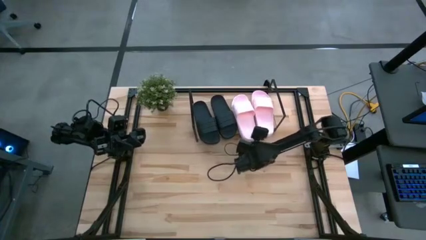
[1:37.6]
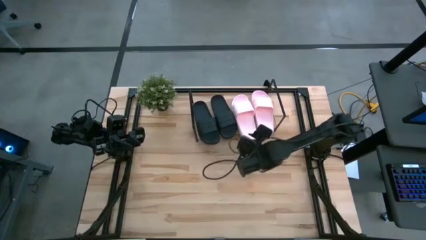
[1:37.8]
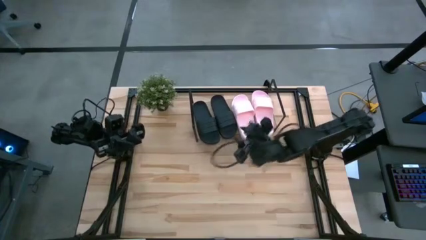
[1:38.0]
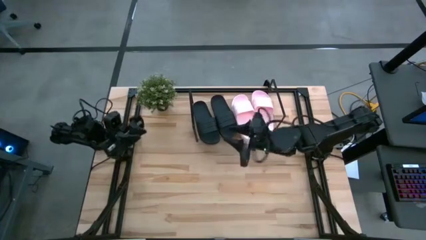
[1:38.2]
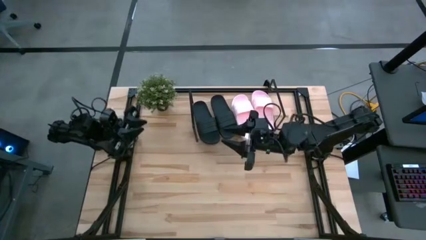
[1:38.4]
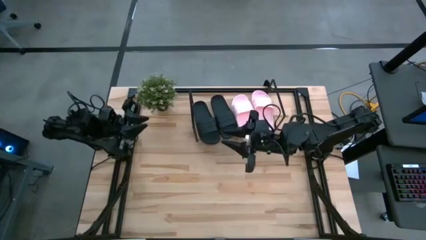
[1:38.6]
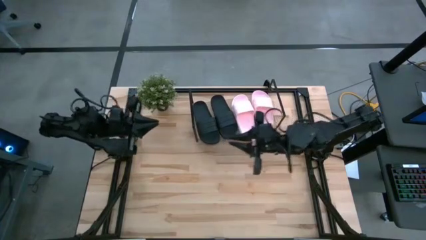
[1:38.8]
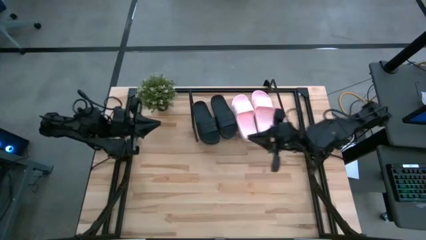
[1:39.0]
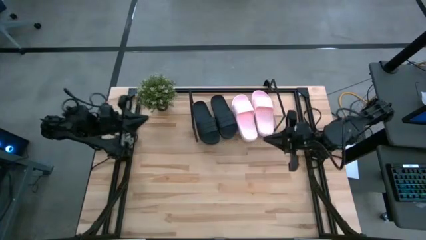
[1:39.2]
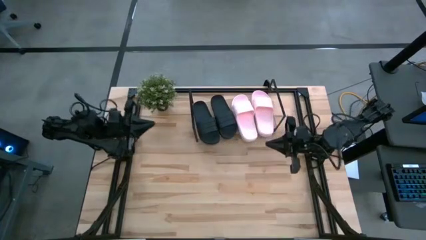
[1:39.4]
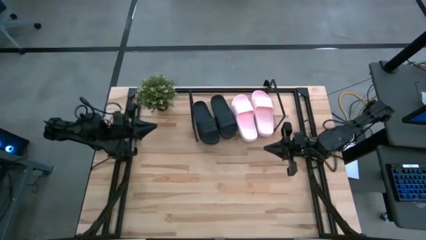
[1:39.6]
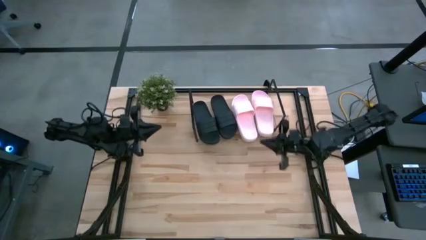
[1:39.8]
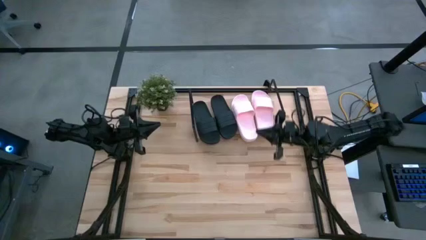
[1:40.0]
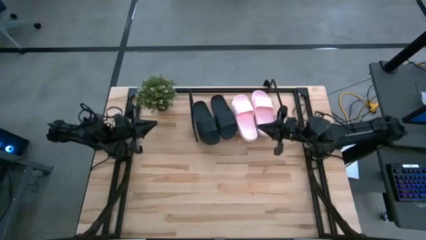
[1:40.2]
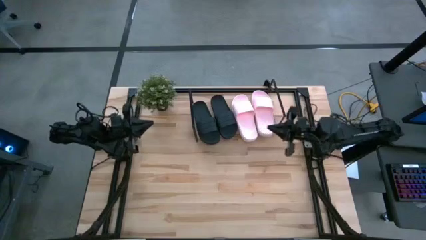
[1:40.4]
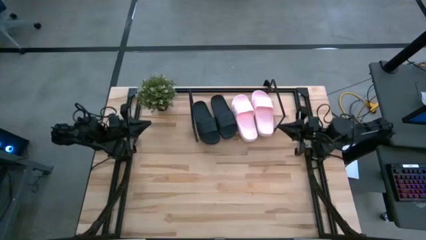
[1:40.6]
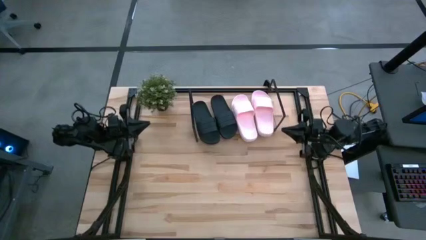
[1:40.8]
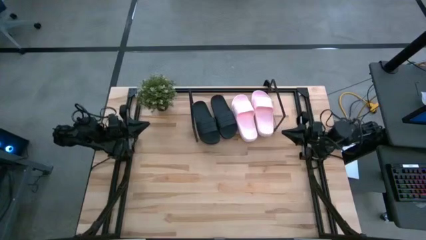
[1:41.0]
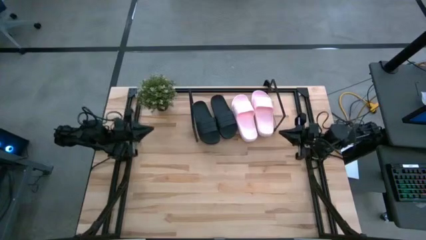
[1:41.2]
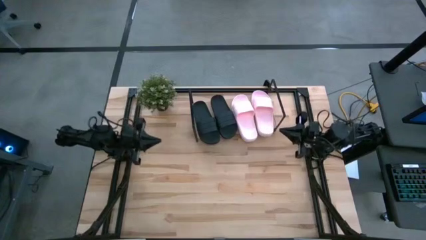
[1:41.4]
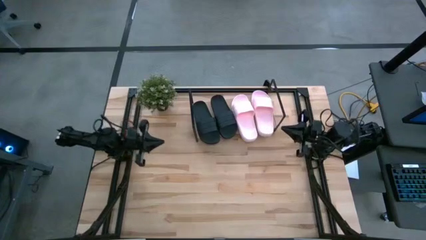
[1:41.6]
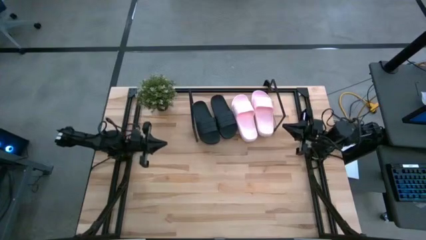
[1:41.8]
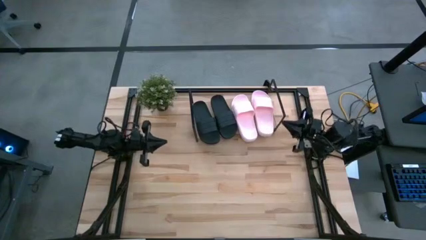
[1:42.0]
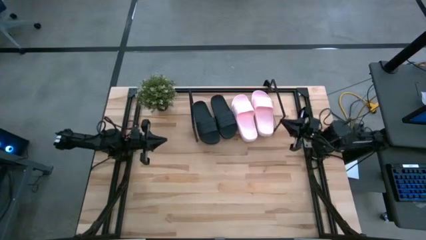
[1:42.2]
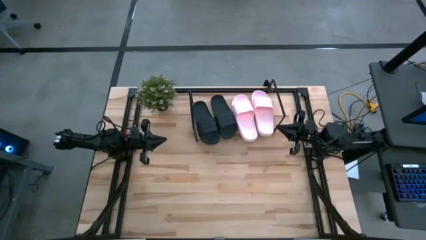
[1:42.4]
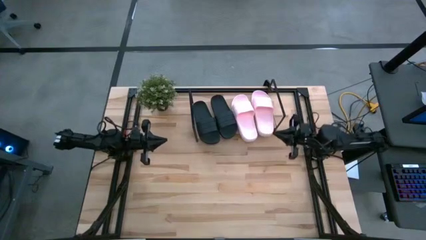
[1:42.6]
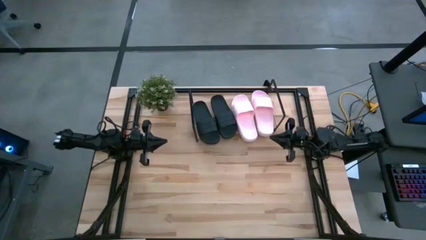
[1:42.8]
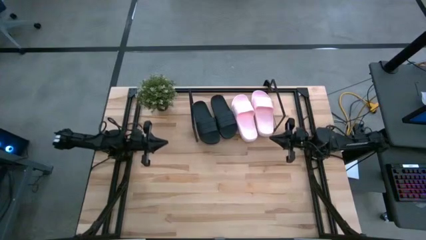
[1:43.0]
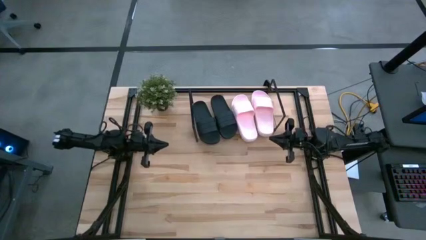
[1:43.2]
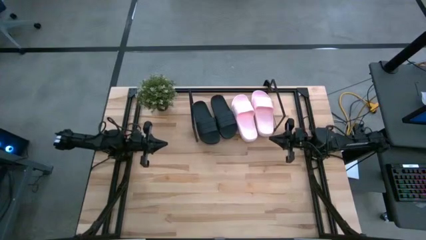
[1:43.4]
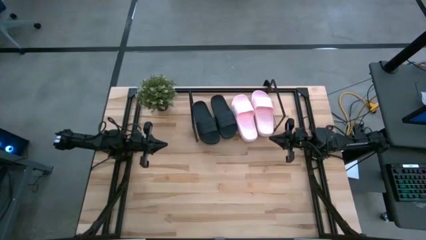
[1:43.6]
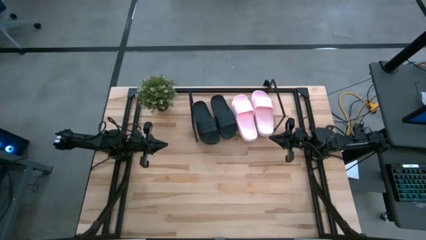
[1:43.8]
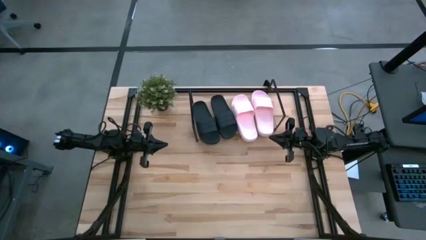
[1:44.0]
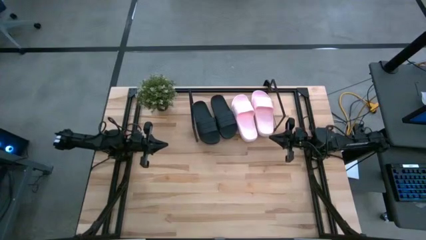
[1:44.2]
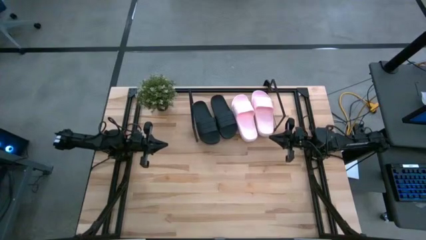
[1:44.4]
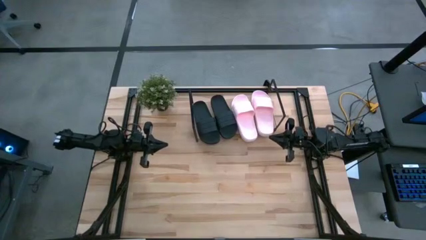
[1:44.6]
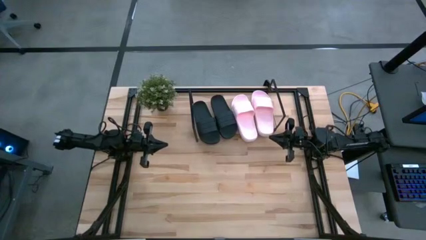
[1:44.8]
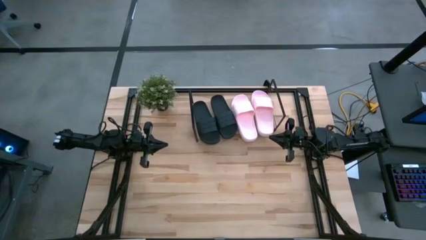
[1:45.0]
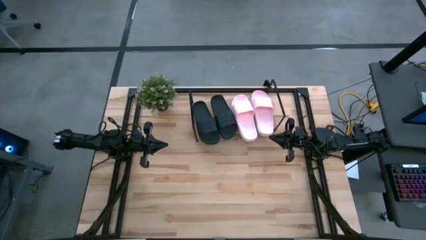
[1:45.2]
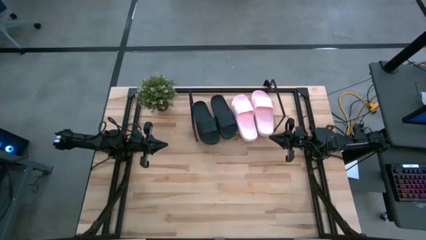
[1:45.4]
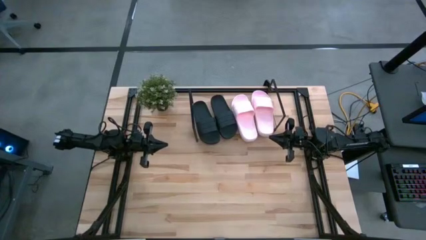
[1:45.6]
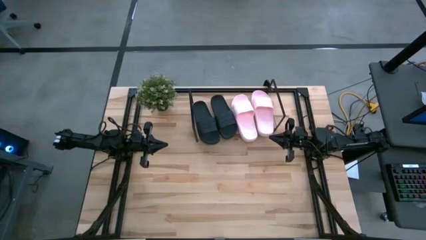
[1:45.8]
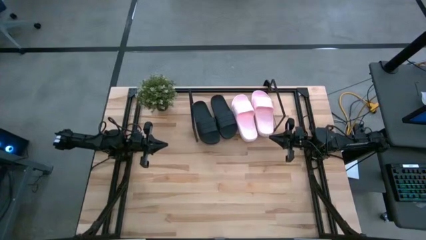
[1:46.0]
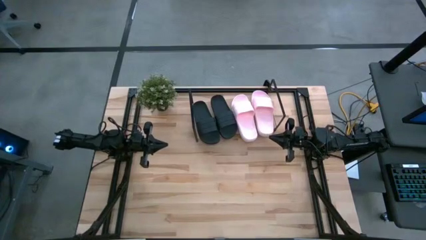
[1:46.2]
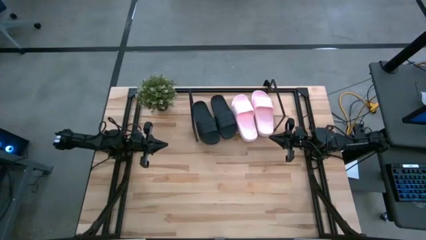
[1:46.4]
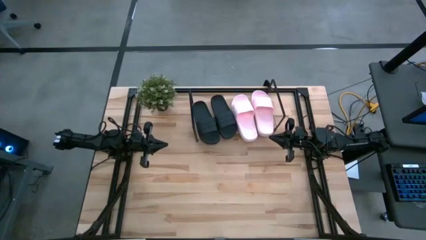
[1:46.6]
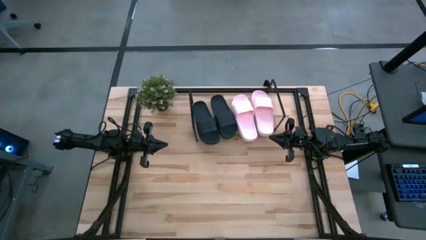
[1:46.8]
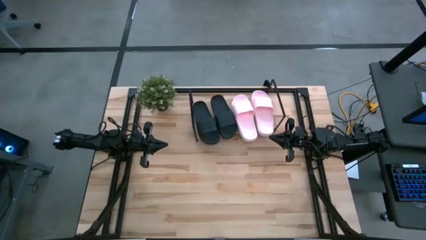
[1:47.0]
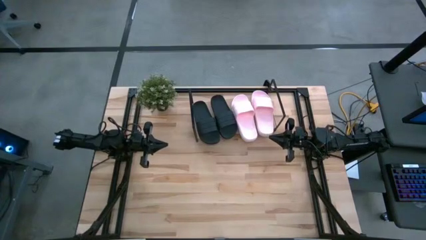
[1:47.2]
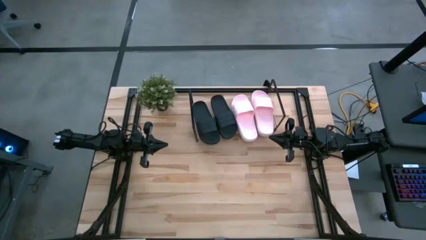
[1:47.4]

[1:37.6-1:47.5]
Task: Pick and place slides into the shelf
Return to Home Position

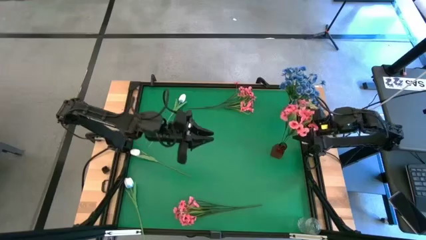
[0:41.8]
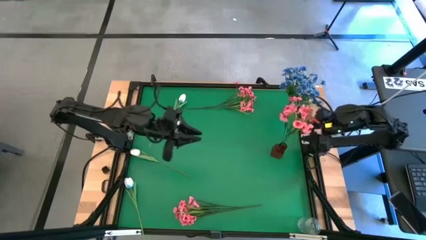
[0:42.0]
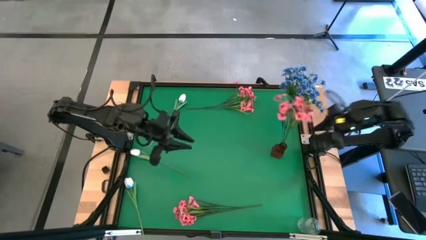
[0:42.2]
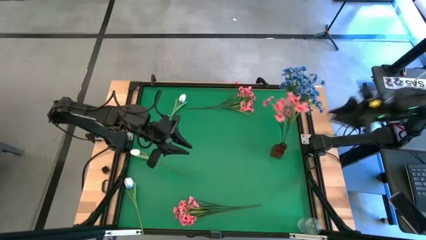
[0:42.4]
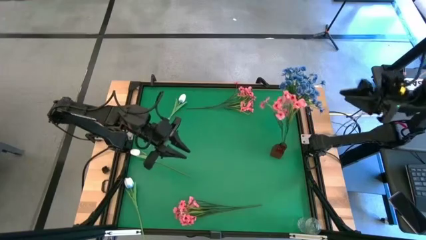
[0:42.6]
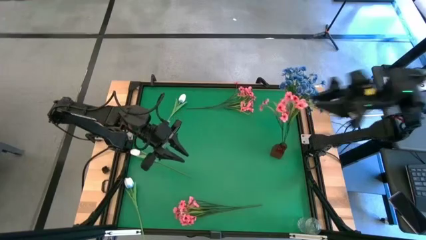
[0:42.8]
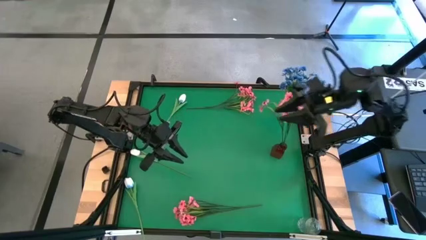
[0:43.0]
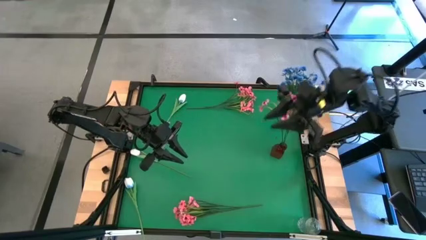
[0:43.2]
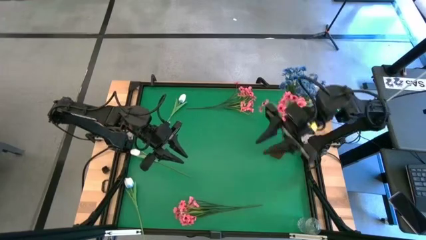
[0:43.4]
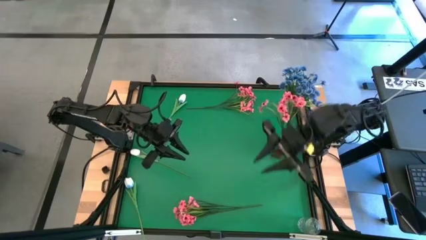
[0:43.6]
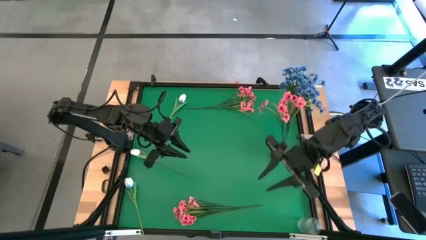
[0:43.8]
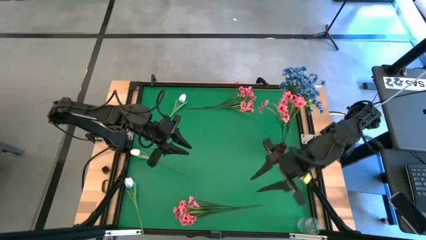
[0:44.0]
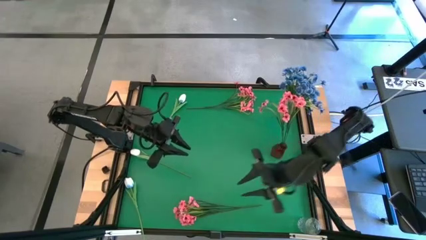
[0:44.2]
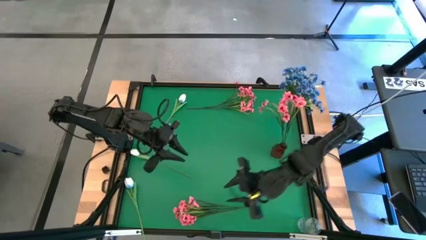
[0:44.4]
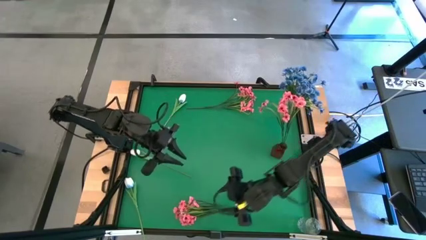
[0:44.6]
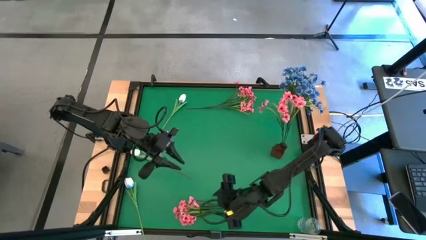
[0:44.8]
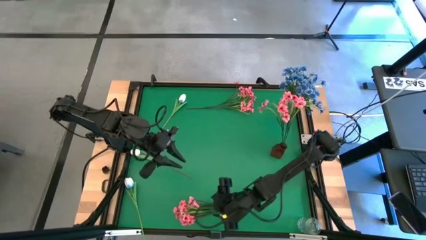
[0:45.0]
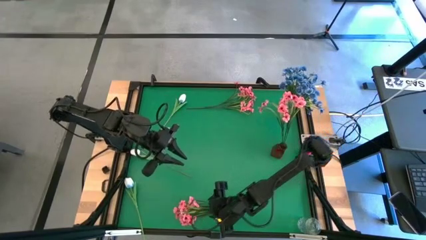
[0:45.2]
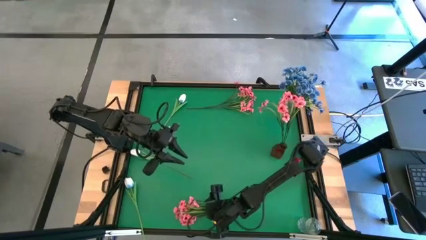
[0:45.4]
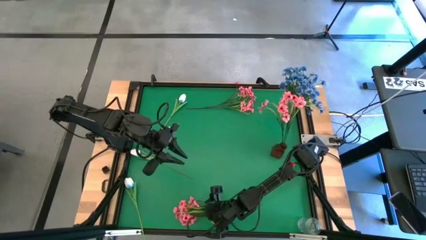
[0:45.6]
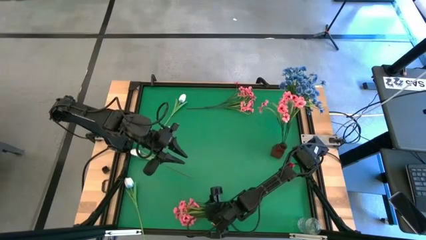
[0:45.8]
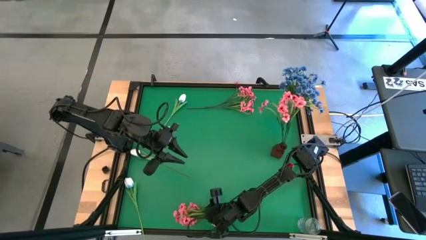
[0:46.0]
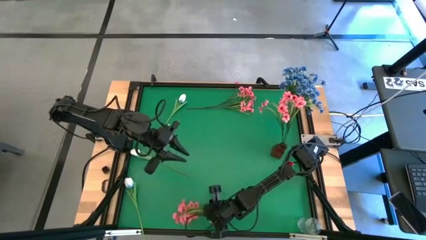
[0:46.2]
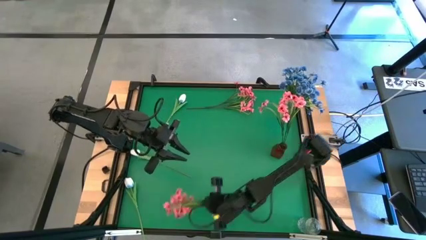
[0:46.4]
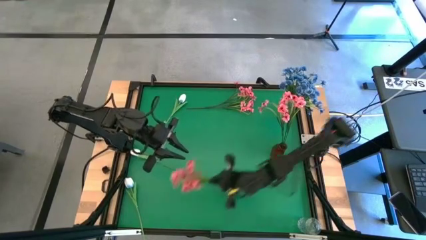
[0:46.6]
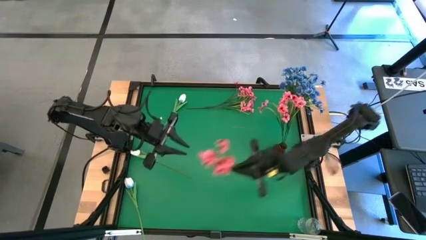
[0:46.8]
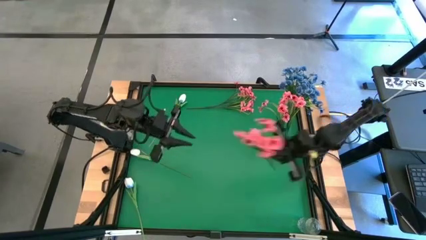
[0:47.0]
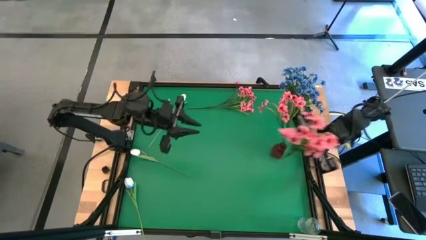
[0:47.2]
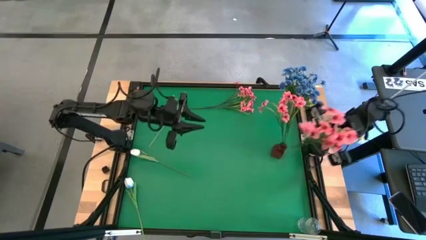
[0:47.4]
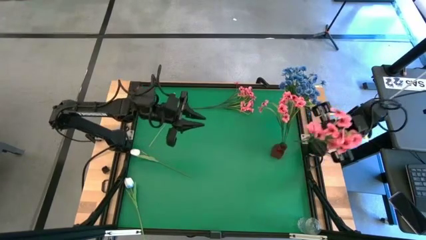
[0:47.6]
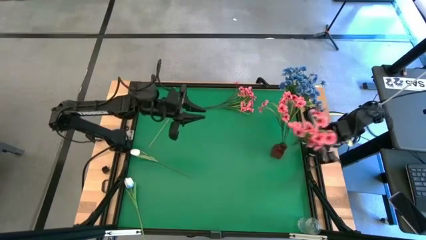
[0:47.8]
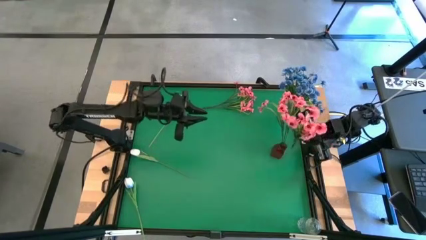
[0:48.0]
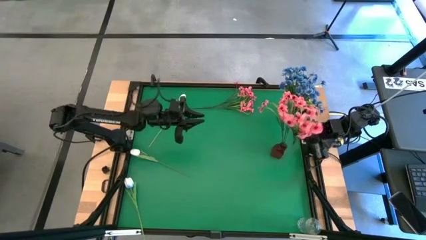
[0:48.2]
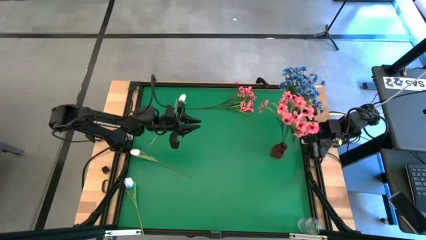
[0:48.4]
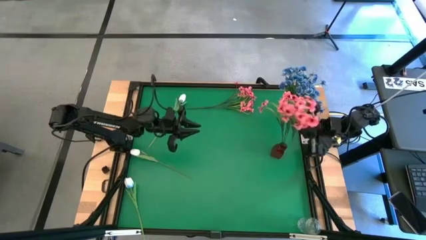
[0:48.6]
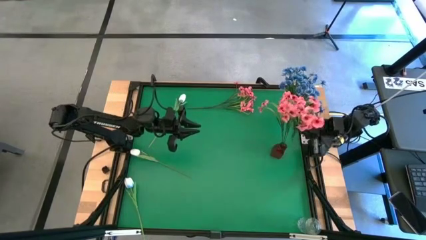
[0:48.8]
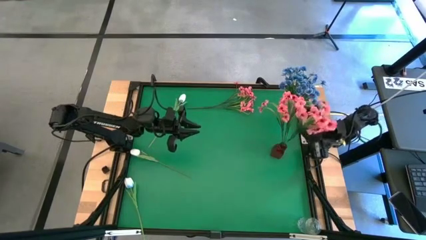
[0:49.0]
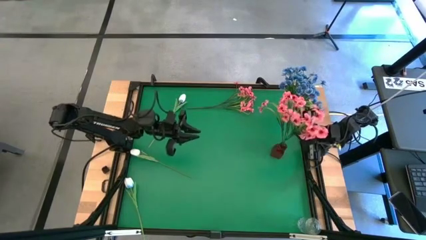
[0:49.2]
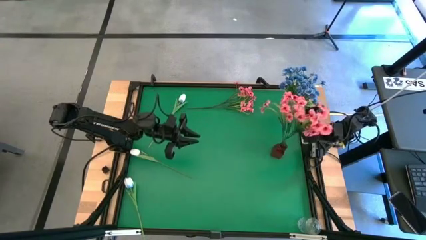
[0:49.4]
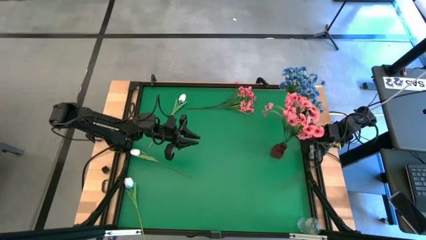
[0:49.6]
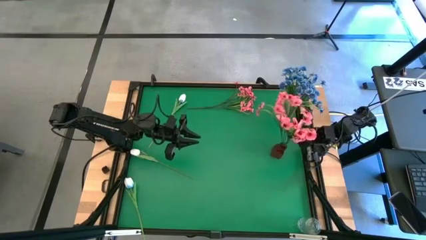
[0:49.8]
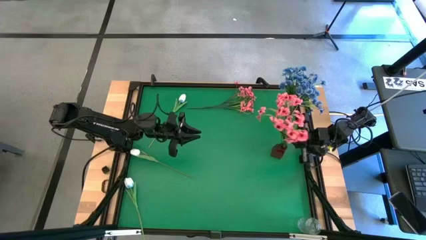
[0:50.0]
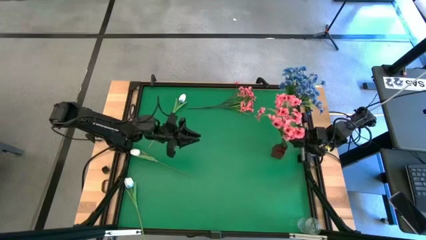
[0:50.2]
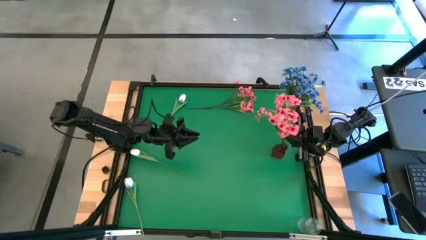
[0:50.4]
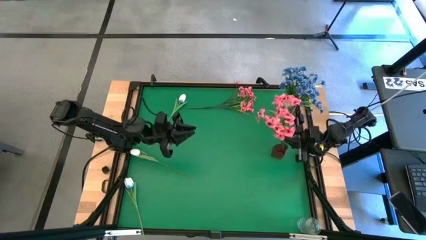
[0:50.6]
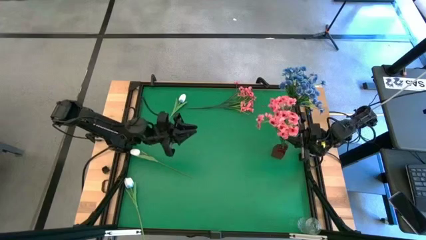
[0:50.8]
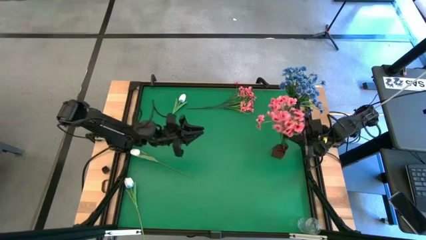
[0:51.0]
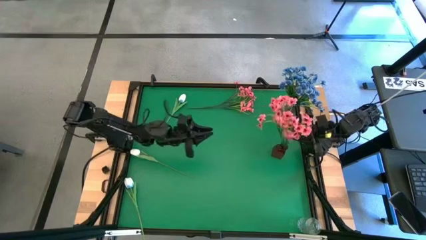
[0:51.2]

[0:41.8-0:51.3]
Task: Sort flowers into vase by color
Put the bottom pink flowers into the red vase
